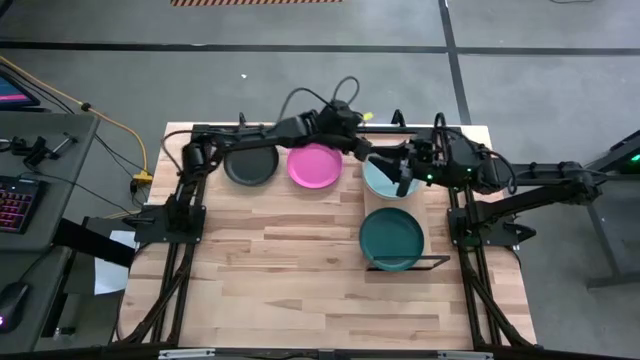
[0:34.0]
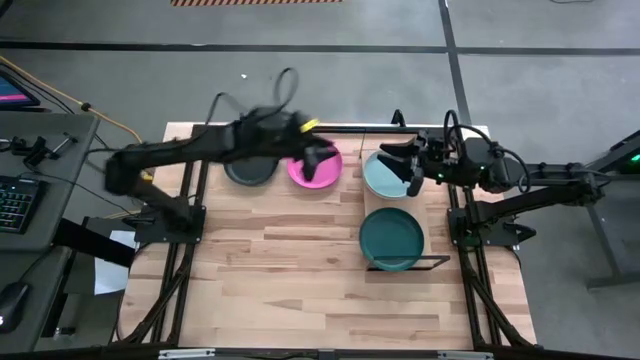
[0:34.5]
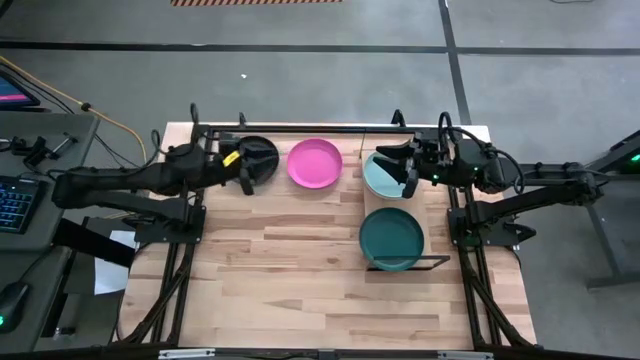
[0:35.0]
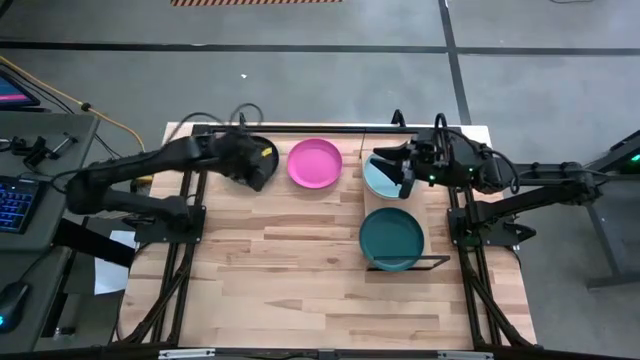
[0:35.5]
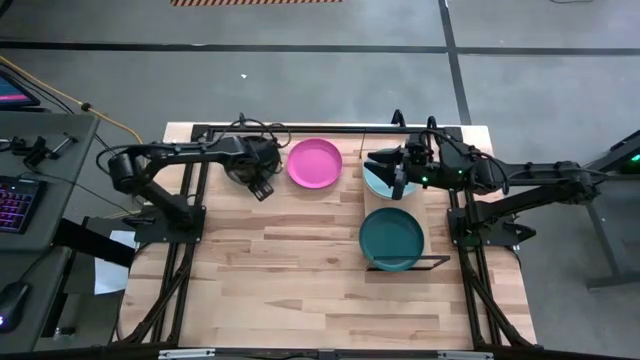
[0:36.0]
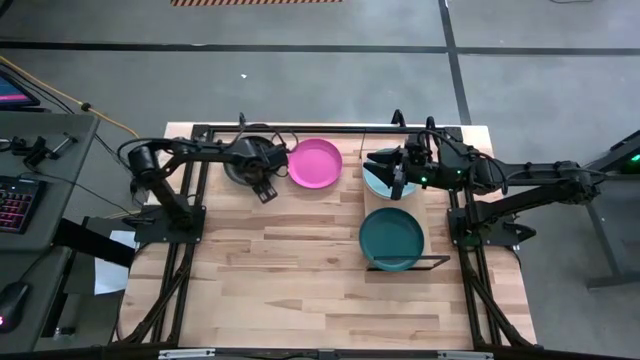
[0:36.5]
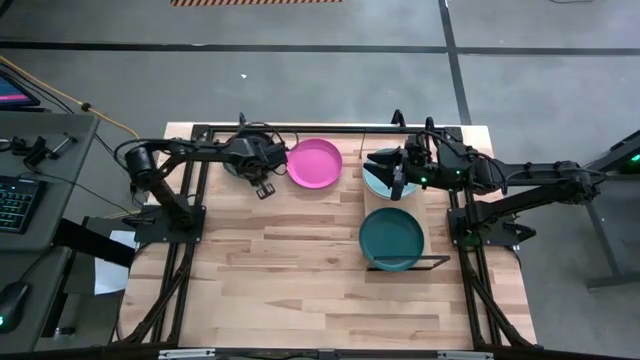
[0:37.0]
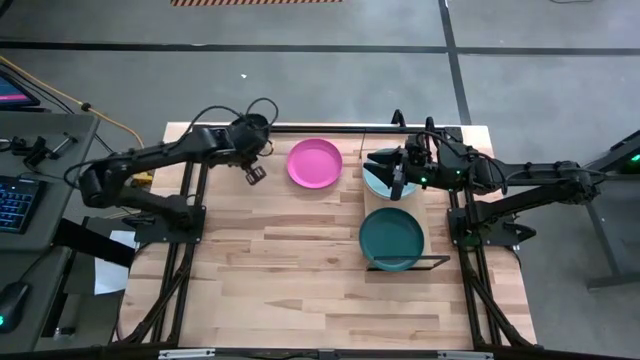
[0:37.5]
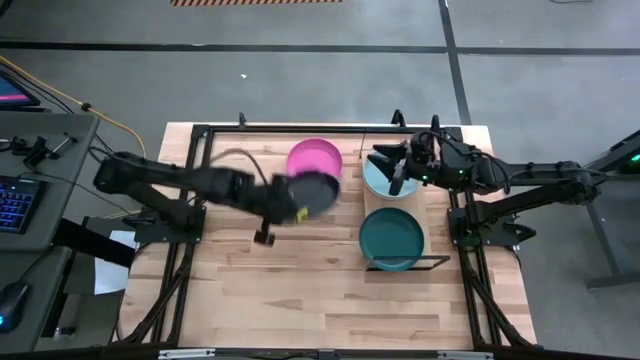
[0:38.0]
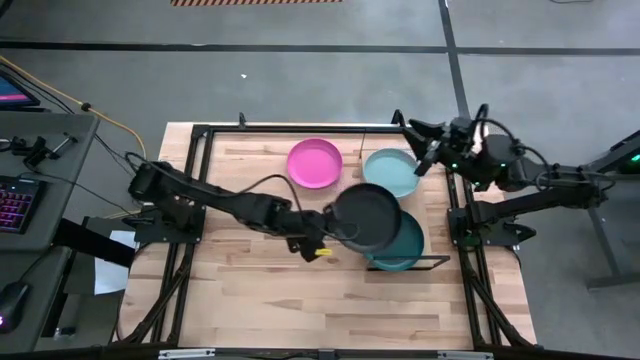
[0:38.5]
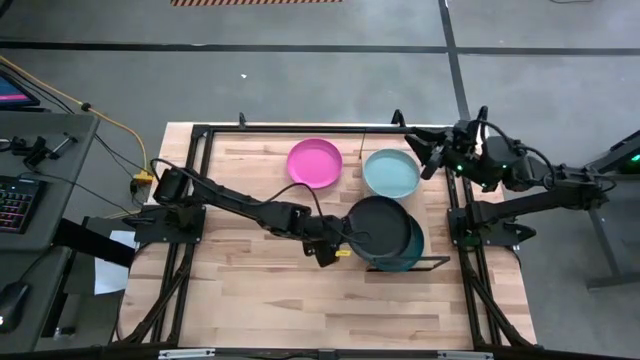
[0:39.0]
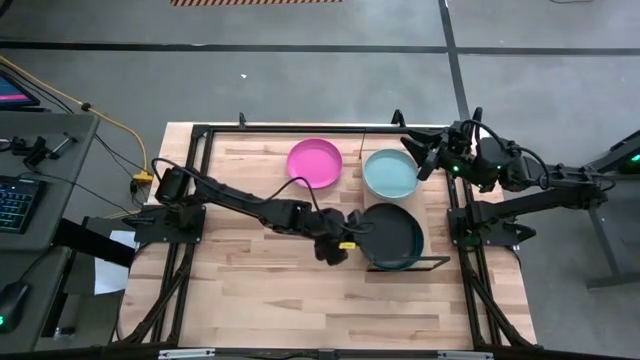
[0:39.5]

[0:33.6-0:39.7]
Task: Place and stack plates onto a shelf
Stack the black plate on top of the dark green plate

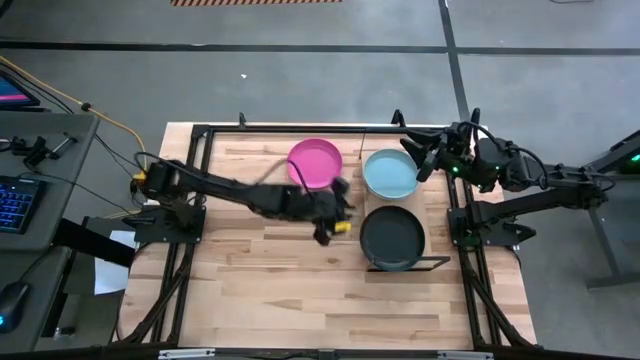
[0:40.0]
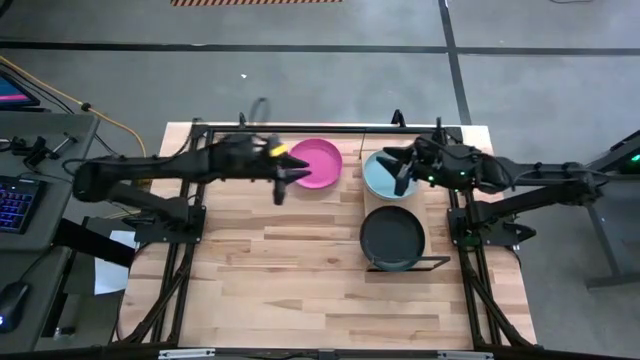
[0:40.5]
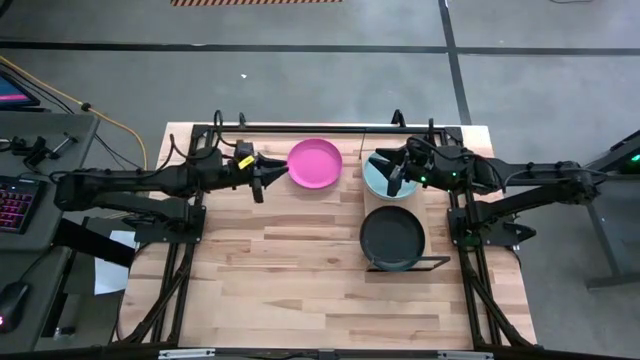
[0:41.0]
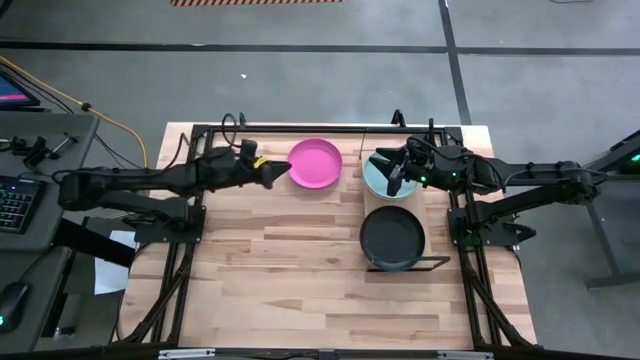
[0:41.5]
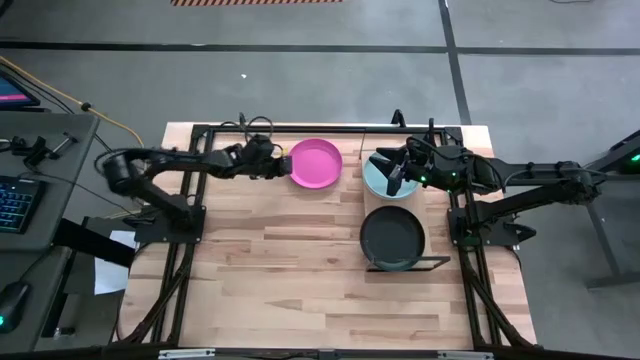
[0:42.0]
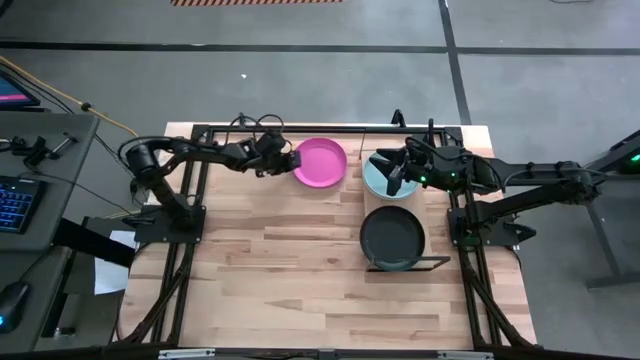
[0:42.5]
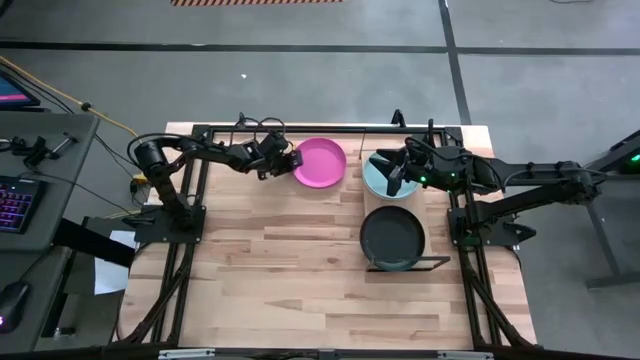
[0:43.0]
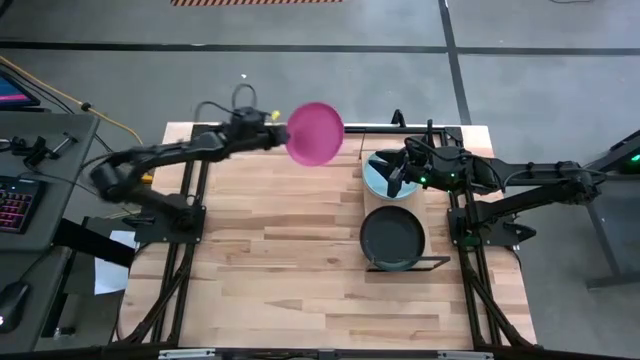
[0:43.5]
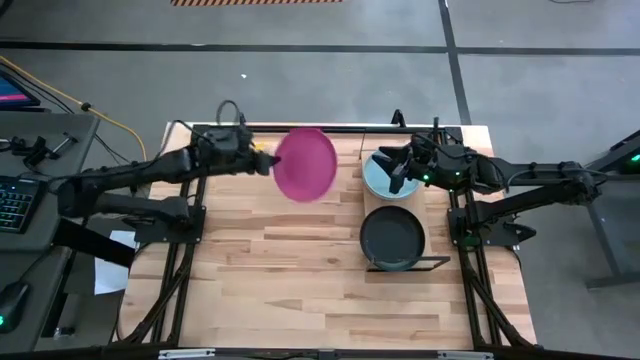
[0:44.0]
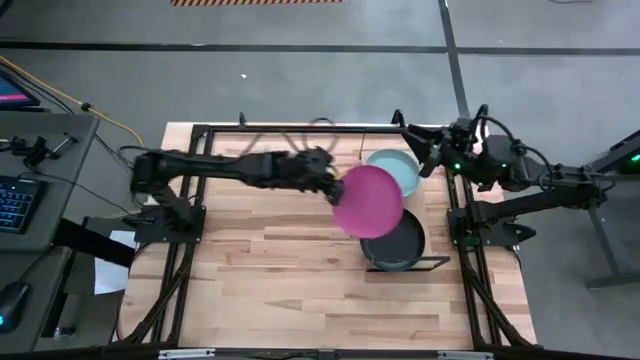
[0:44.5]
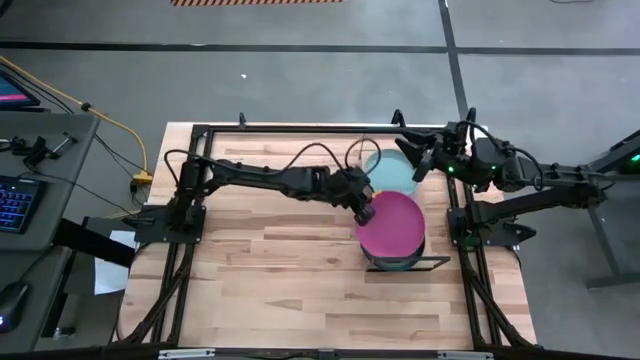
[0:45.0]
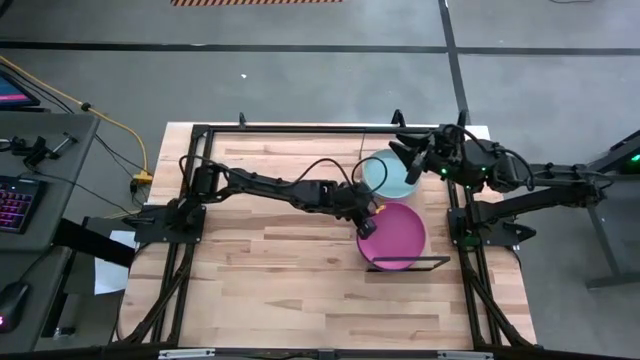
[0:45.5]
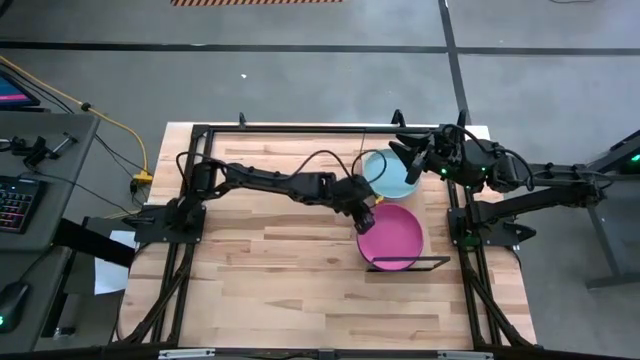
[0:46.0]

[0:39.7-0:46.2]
Stack the pink plate on top of the black plate

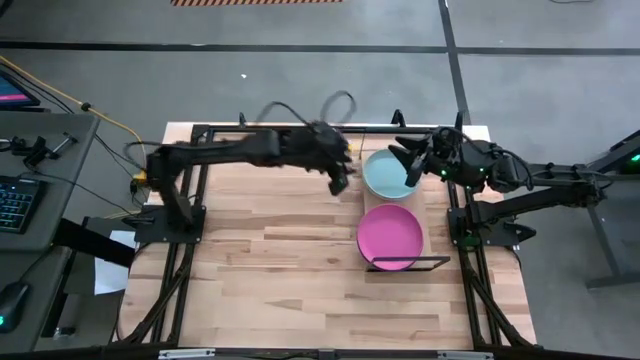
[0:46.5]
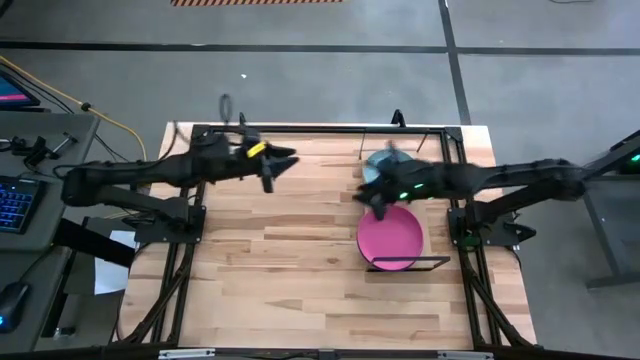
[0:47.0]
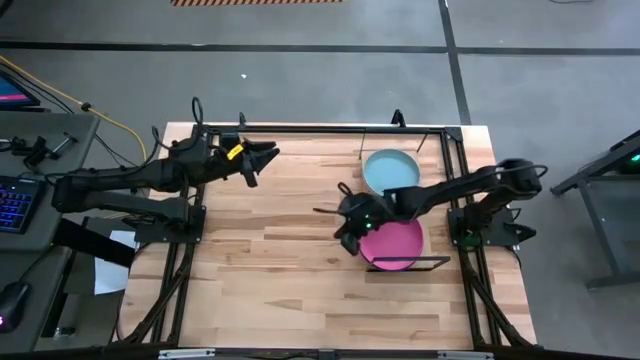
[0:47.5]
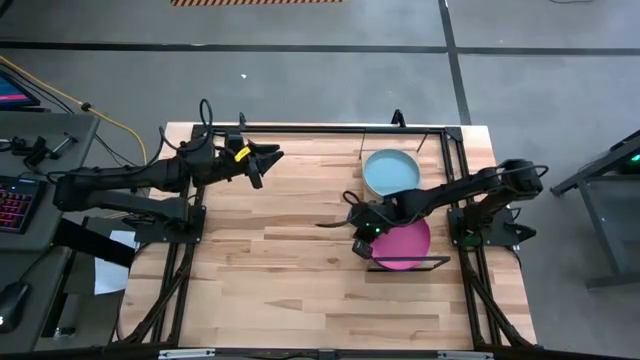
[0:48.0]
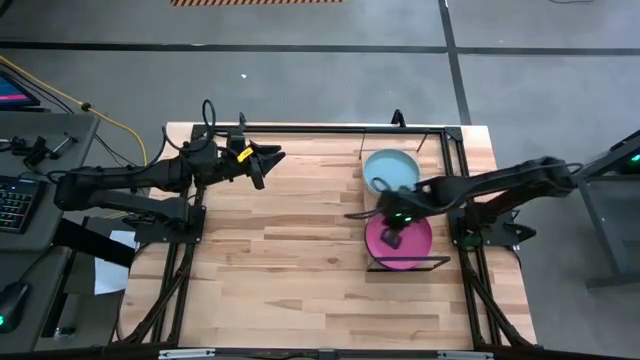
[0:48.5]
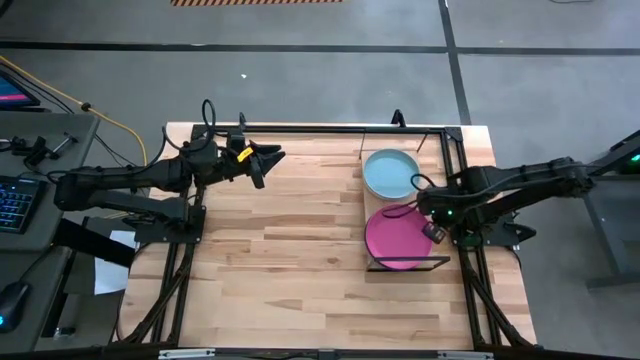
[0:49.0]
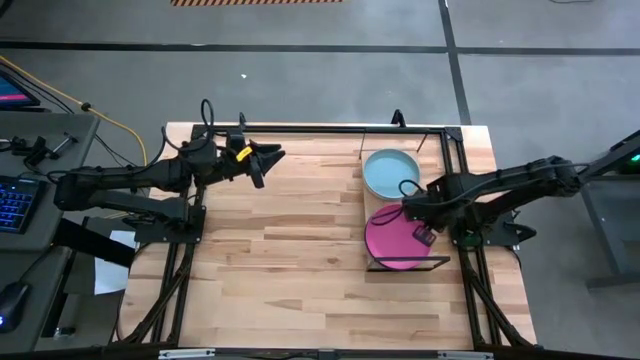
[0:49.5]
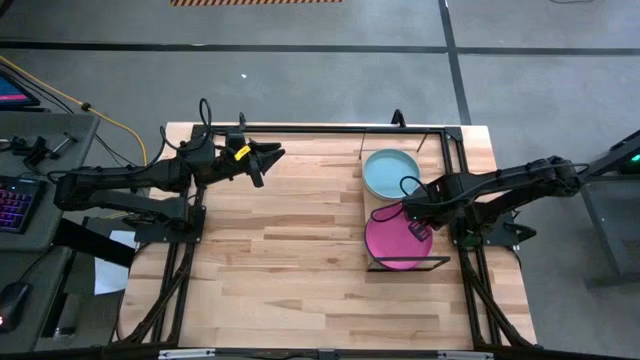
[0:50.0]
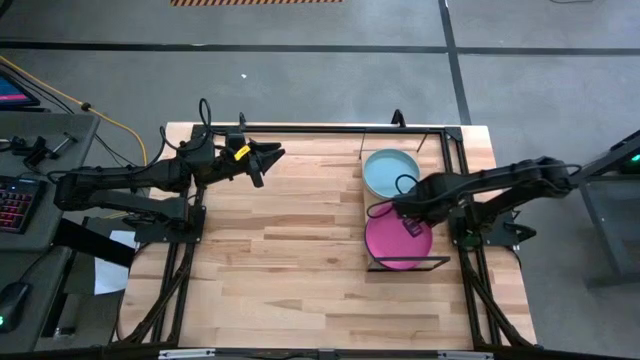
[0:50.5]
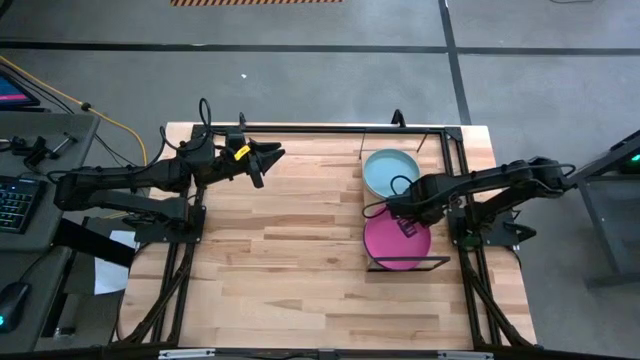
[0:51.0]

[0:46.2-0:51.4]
Adjust the stacked colored plates

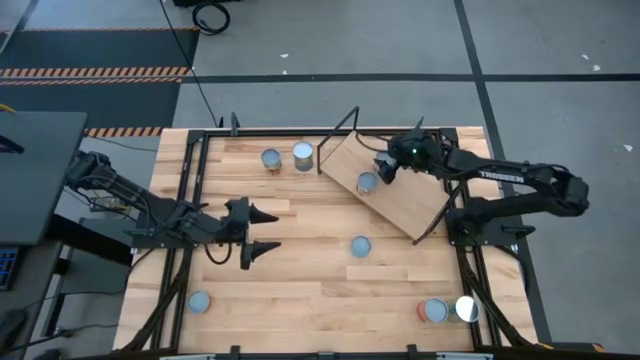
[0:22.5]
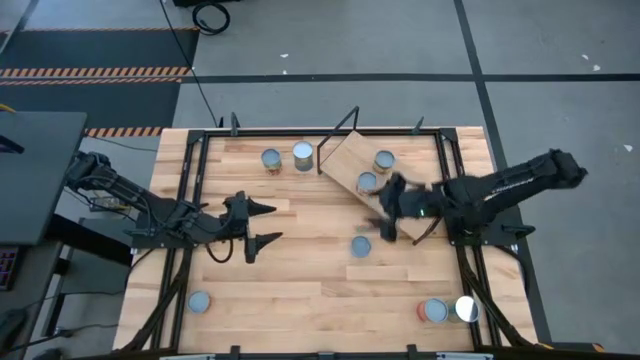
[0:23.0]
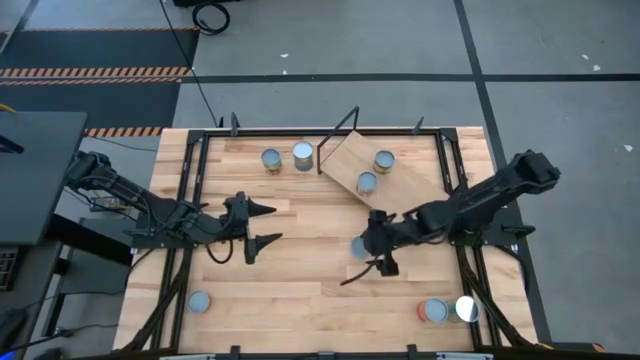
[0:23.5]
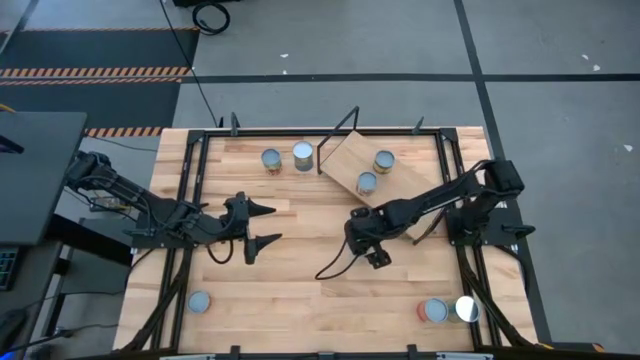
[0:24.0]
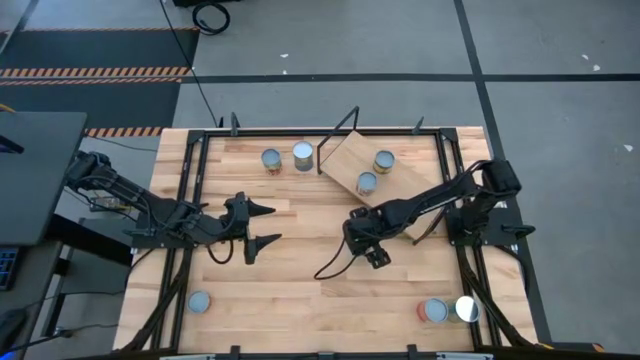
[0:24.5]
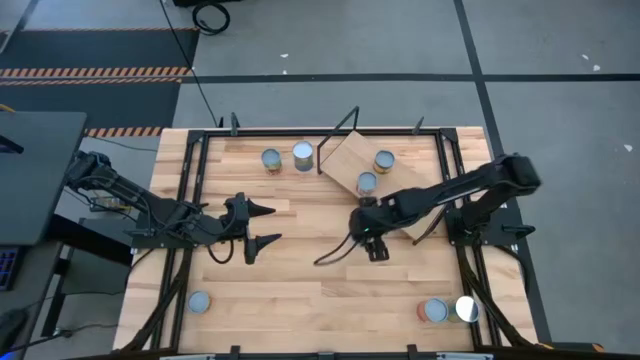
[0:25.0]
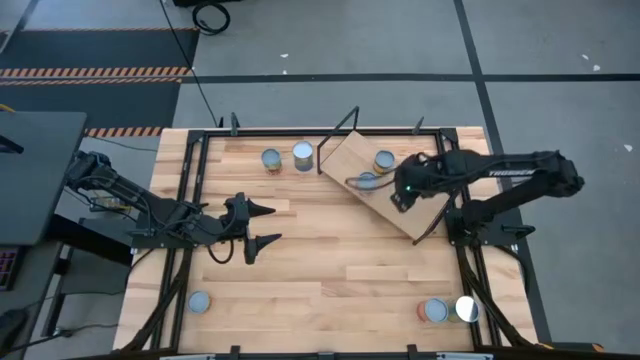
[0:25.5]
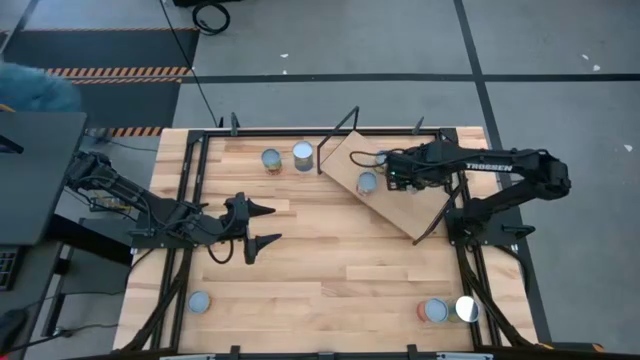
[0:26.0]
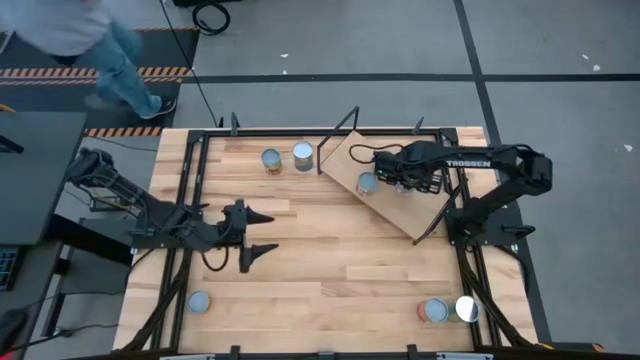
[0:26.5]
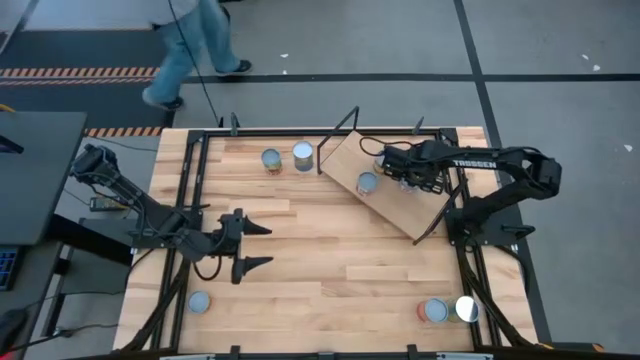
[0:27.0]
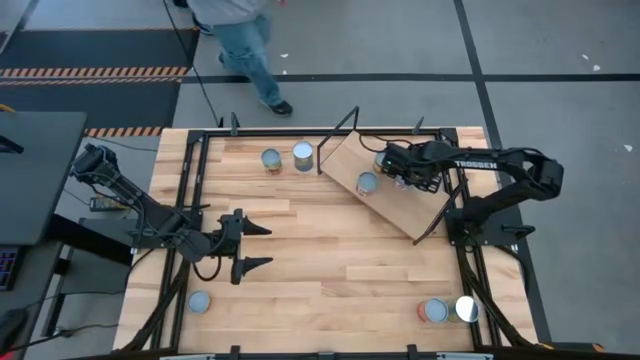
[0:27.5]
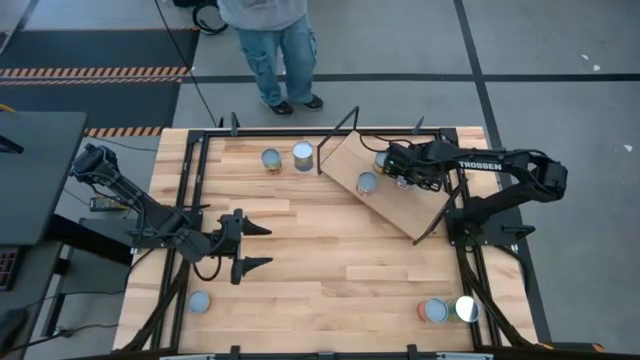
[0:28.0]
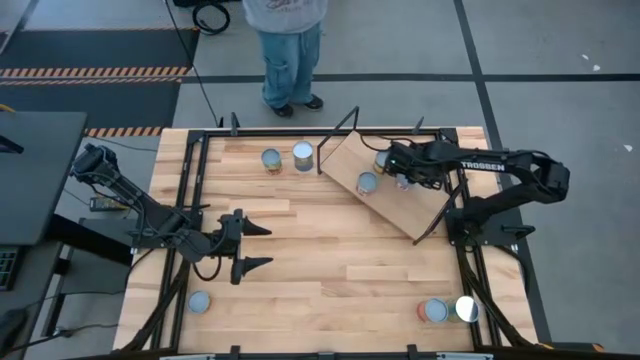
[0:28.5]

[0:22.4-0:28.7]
Task: Pick and place cans onto a shelf
Put the canned salmon on the shelf
